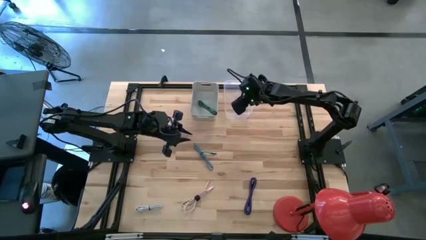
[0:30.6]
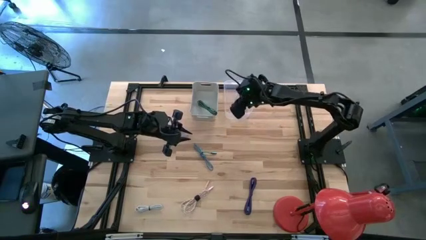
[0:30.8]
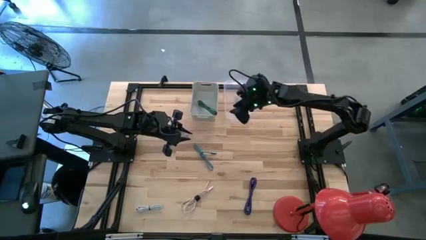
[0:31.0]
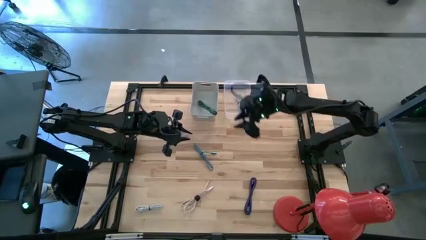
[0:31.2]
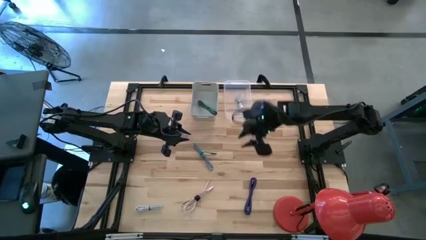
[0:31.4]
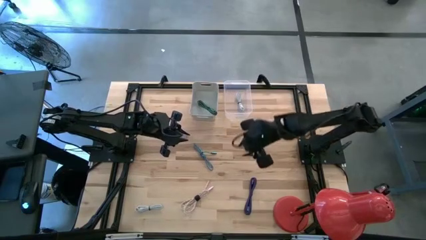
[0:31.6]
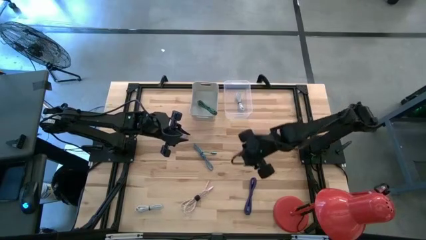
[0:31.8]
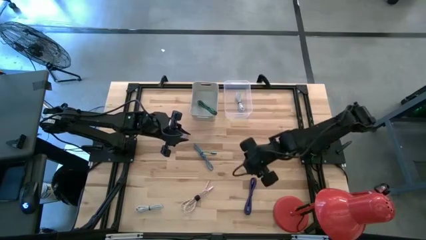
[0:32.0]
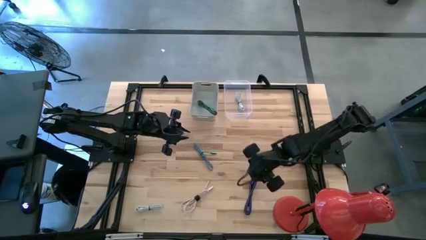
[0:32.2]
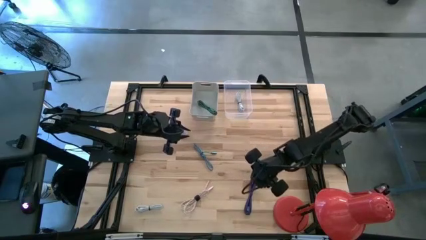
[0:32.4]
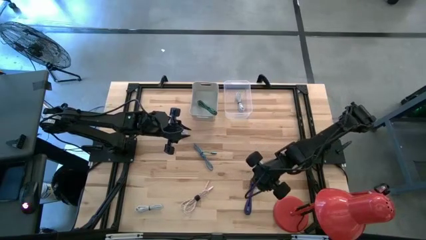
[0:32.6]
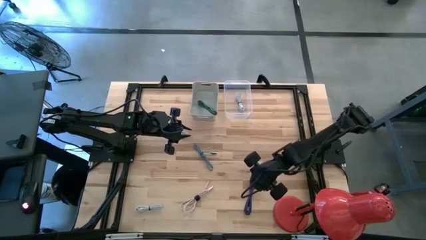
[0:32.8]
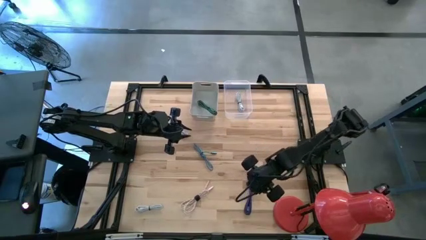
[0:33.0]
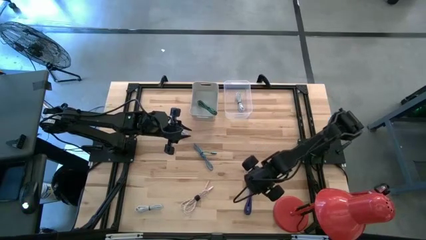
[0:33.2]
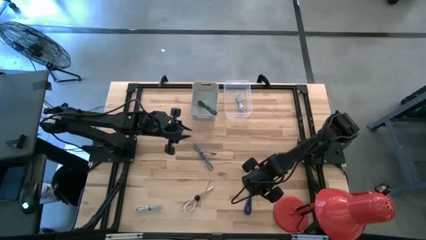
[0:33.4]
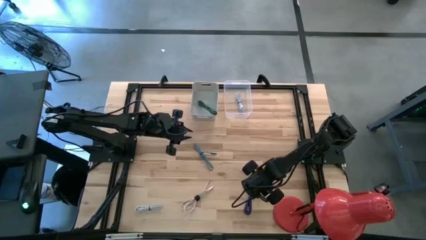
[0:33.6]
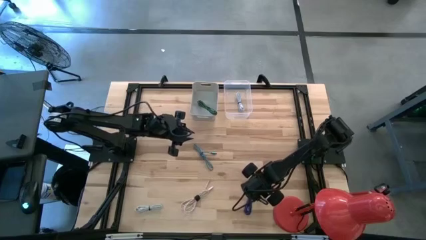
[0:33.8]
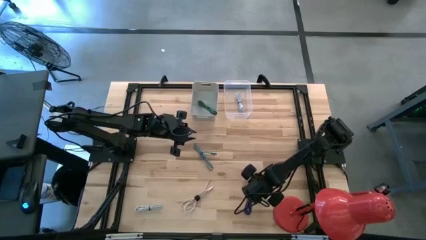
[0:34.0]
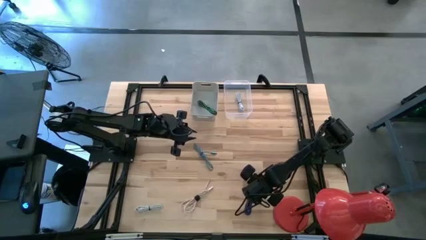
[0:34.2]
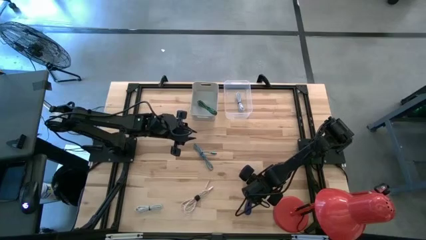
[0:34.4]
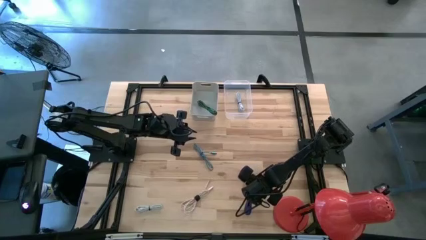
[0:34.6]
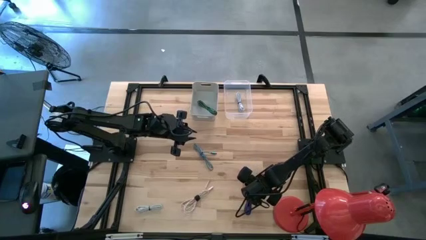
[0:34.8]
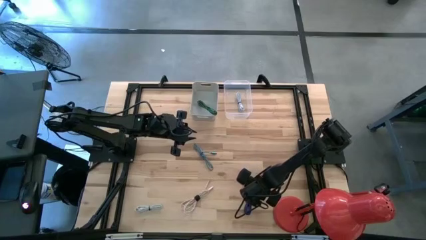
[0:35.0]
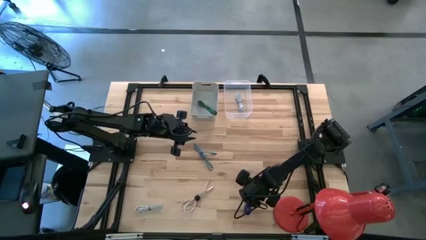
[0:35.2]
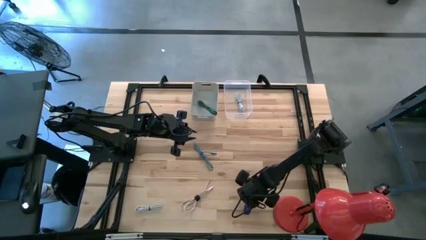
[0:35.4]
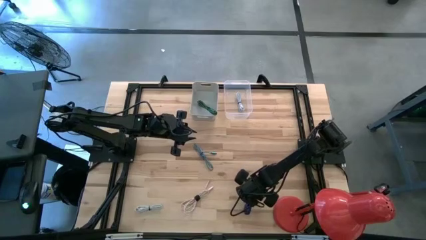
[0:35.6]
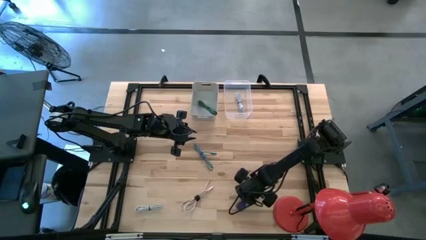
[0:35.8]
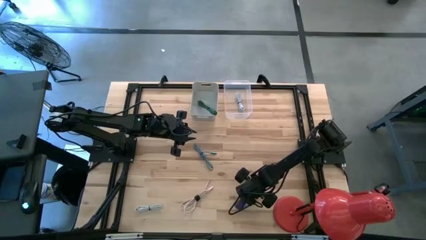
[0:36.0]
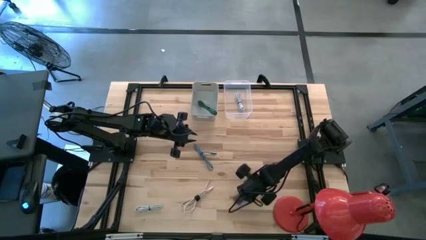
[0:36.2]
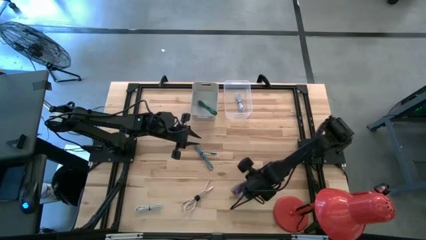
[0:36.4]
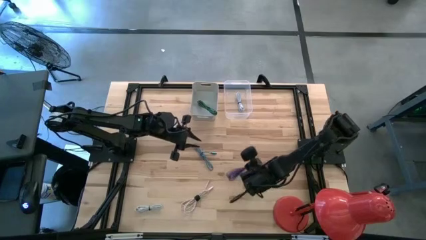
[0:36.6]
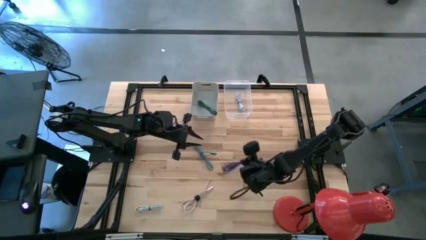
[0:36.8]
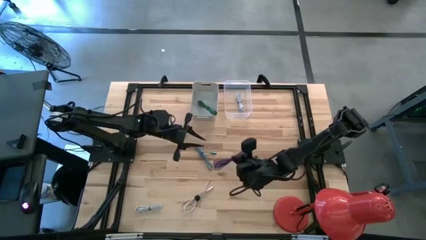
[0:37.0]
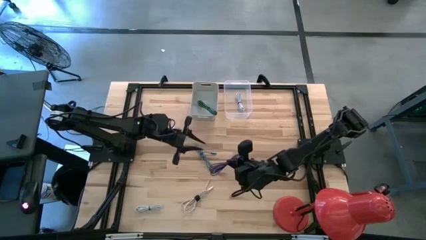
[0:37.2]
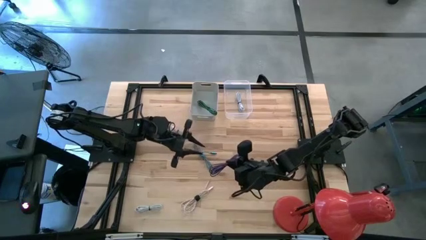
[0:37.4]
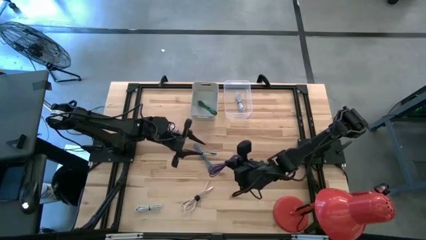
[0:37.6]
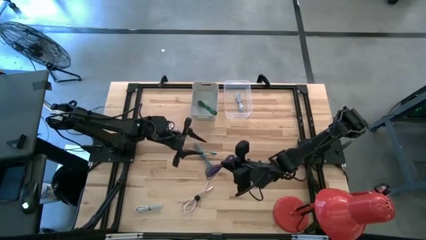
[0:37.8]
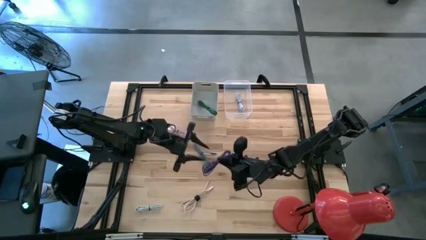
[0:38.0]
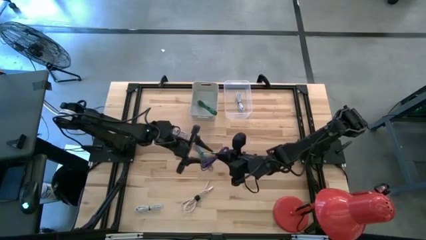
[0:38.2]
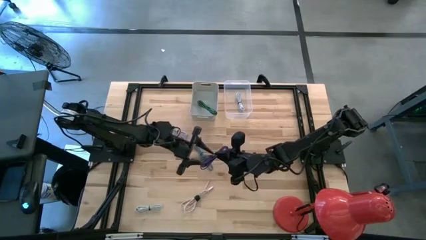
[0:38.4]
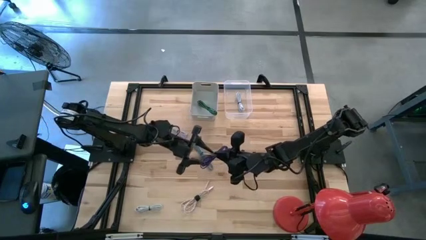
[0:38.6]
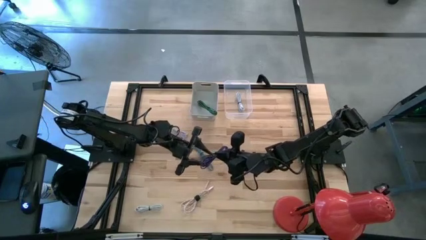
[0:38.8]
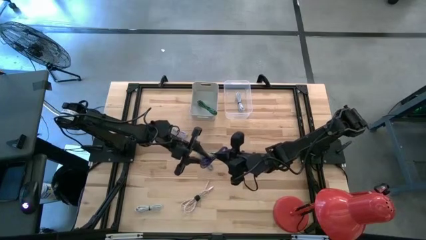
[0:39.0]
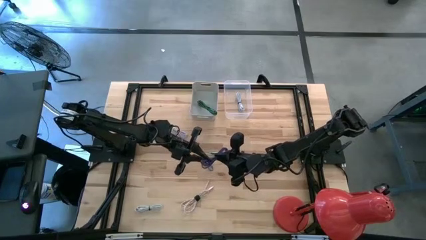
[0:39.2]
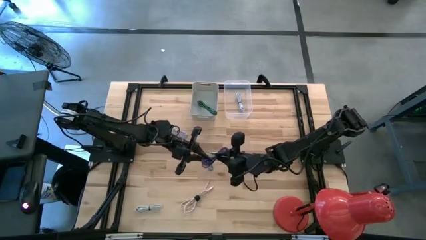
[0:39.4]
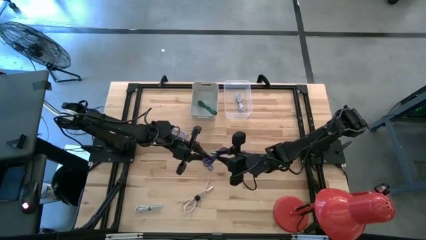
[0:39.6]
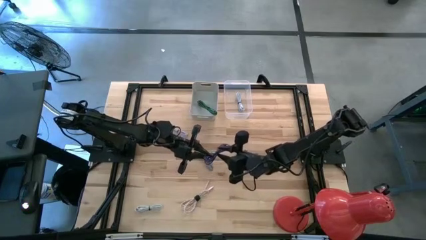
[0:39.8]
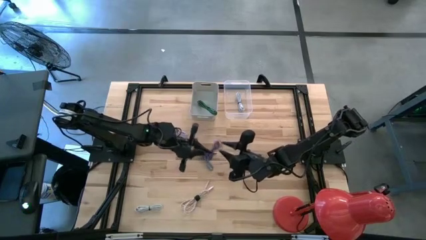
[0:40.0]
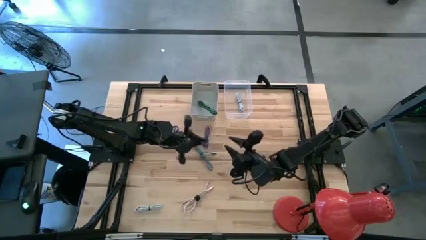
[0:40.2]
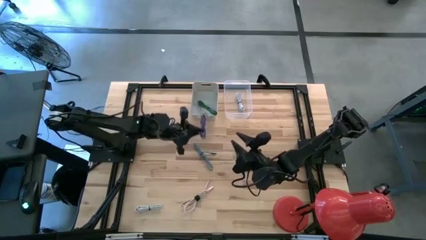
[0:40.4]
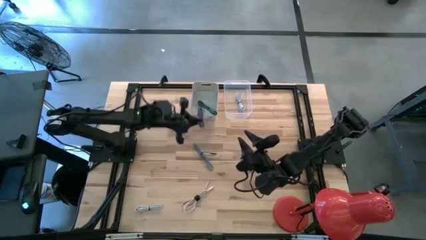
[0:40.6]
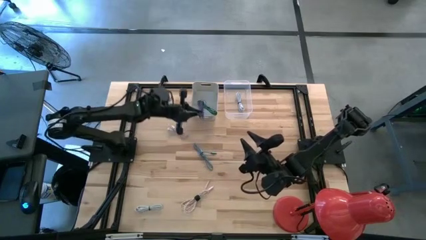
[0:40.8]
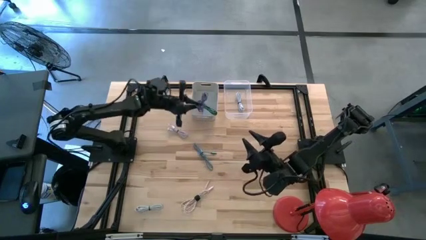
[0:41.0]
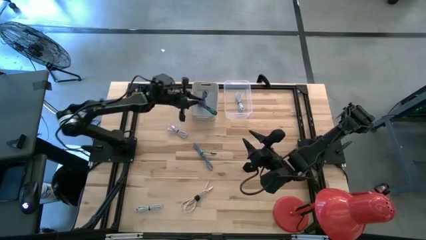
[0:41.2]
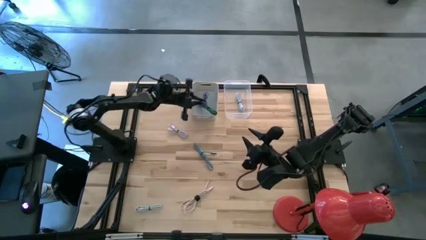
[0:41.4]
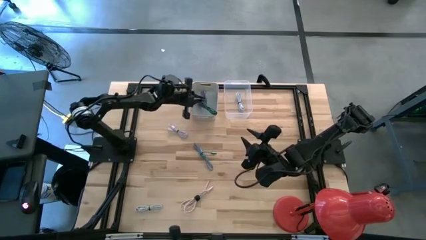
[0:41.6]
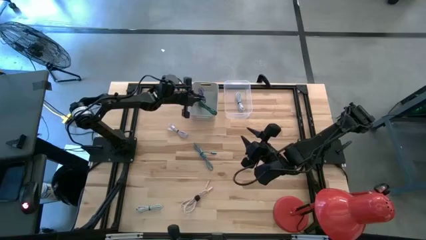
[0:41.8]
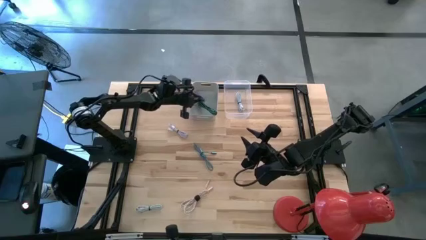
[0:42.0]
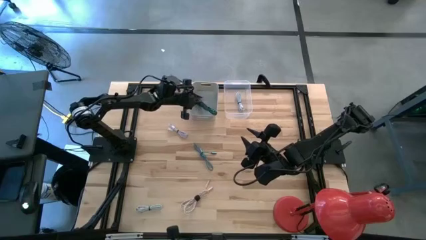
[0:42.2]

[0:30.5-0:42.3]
Task: Pick & Place USB Port
Put the violet and black charger cable into the gray bin
